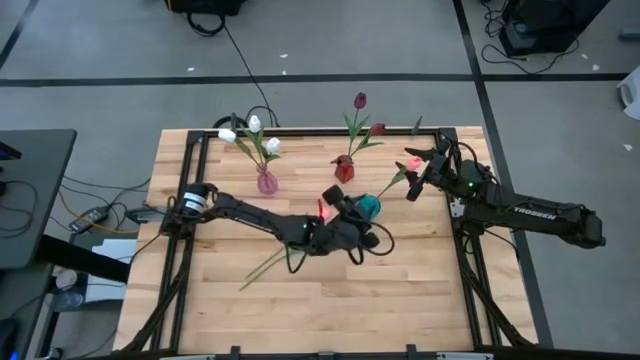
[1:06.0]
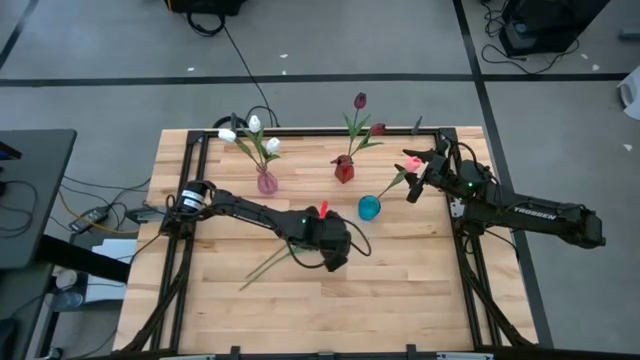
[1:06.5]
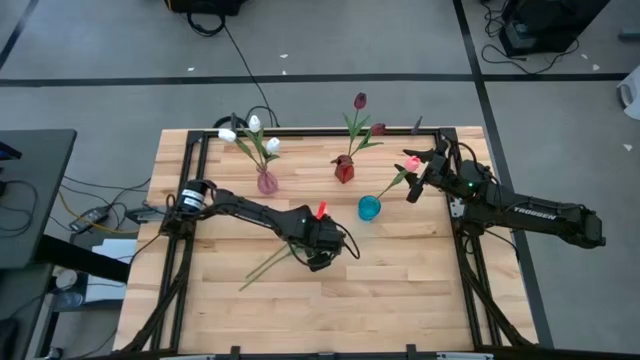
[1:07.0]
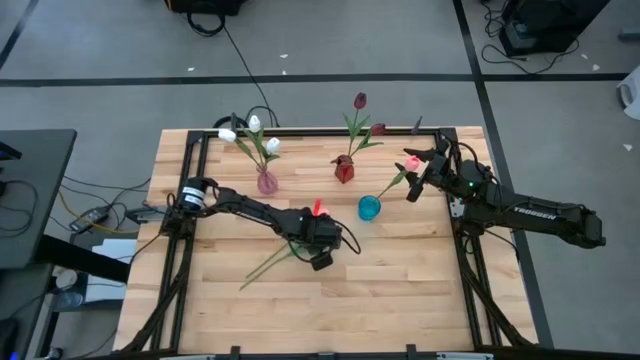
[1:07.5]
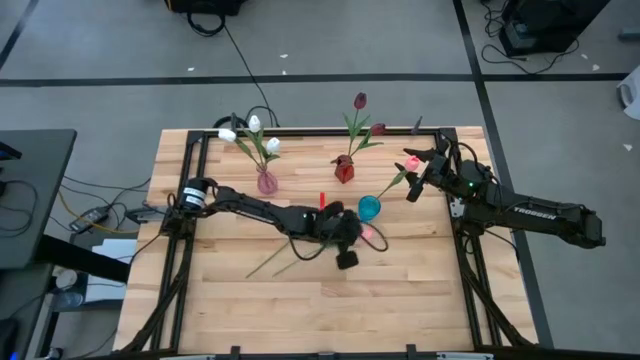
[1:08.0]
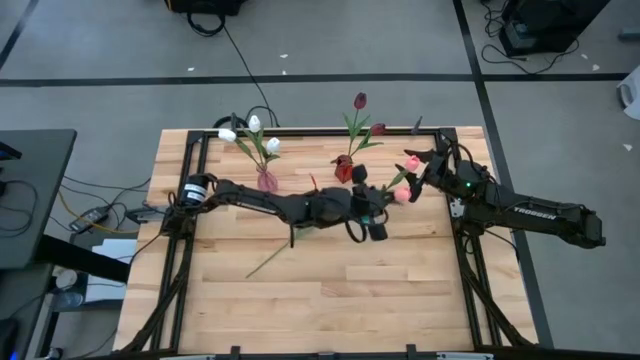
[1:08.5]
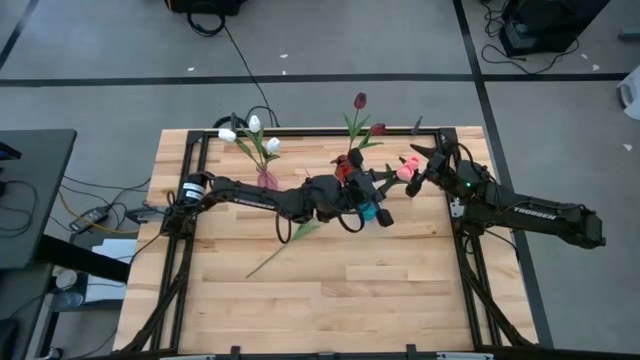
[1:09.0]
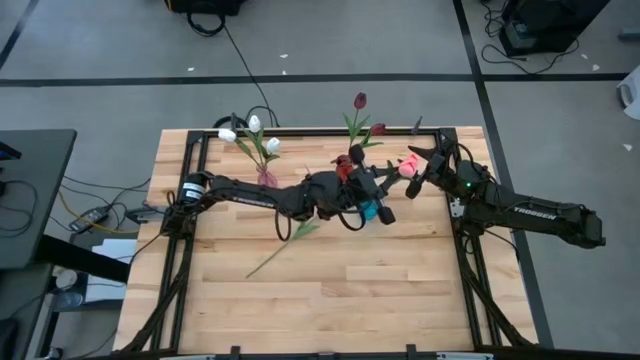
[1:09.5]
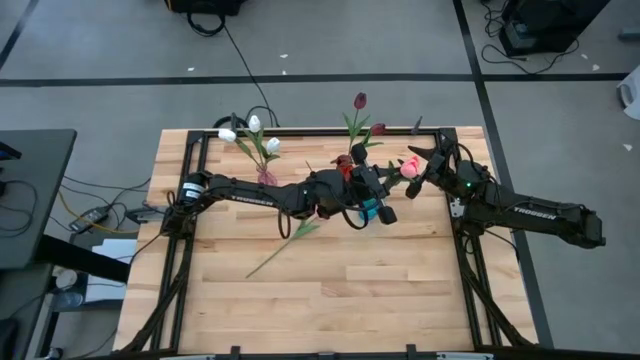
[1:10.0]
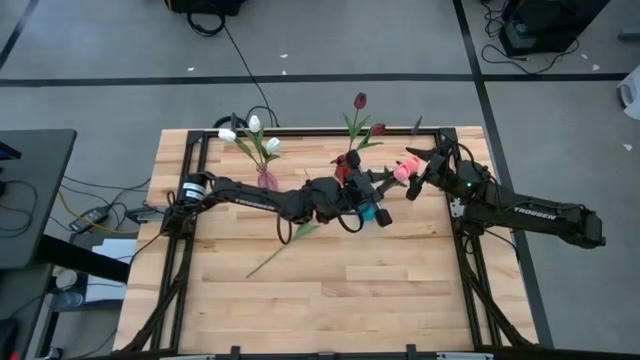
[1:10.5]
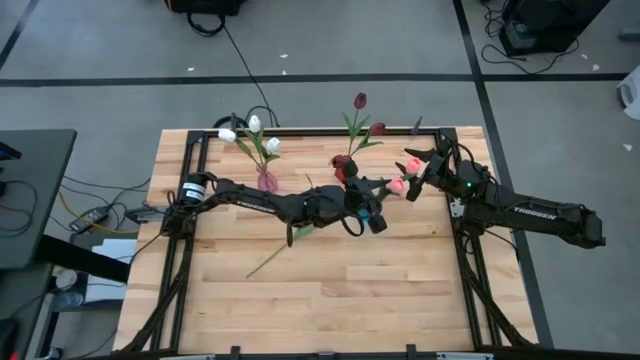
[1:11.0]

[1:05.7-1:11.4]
Task: Sort flowers into vase by color
Put the pink flower into the blue vase

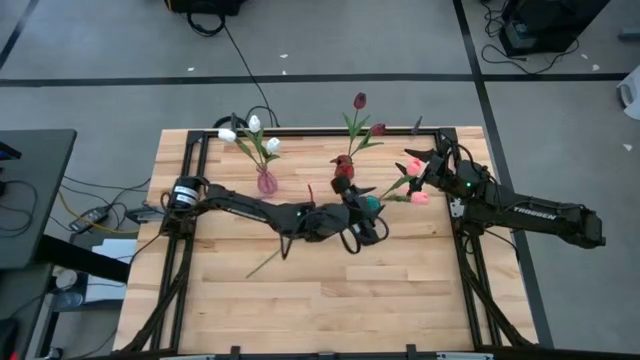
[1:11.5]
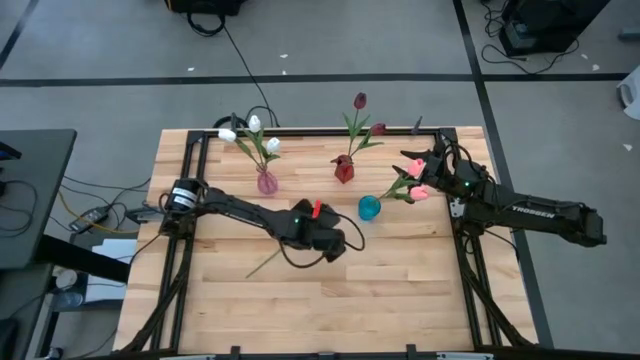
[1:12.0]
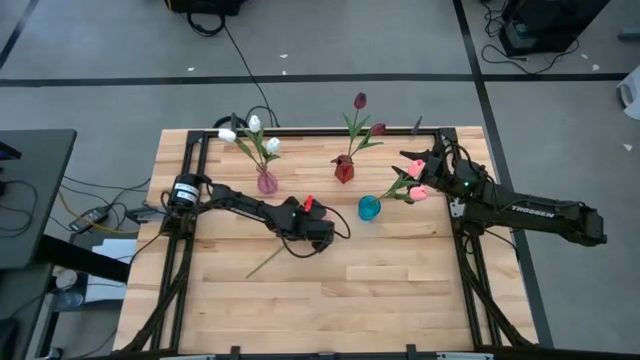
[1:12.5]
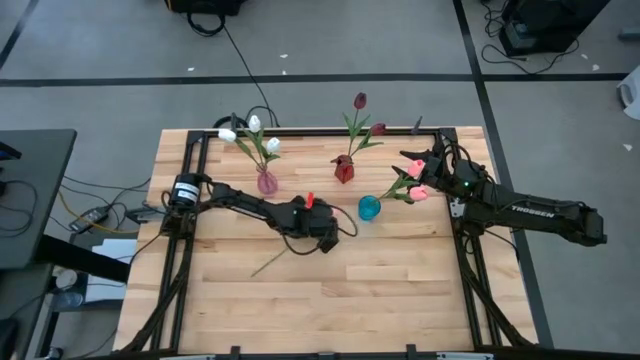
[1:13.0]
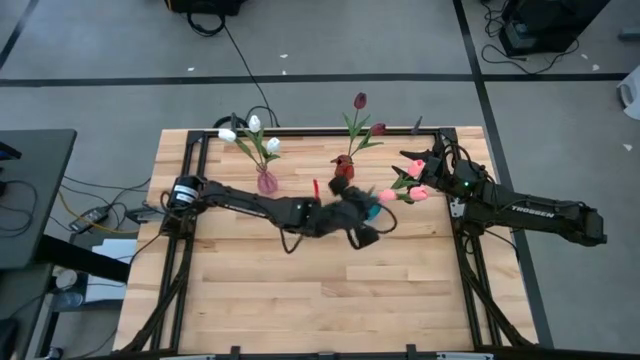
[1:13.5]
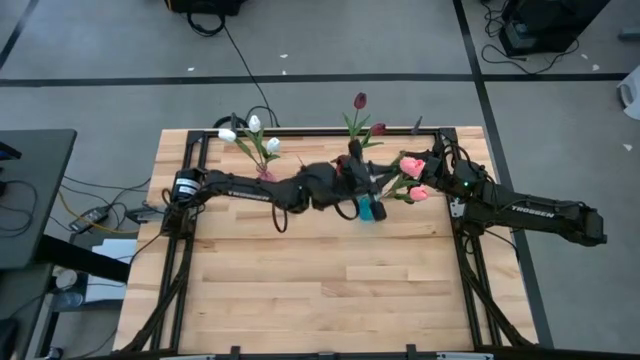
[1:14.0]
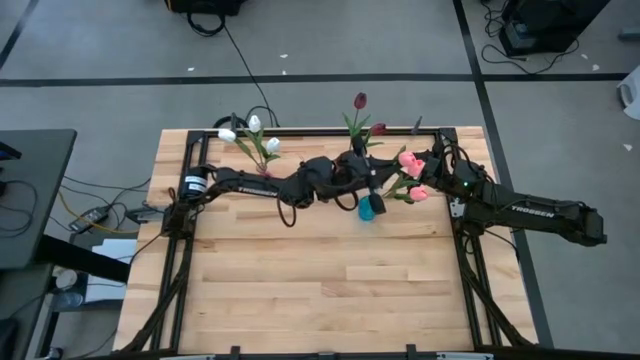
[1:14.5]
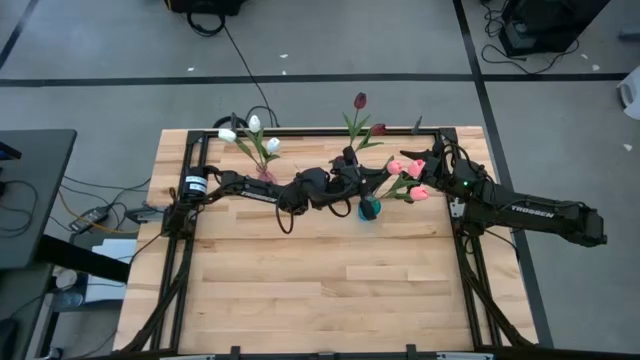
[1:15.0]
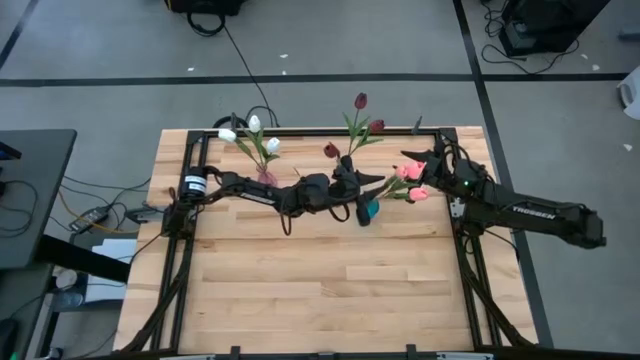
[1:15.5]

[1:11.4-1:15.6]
Put the pink tulip into the blue vase

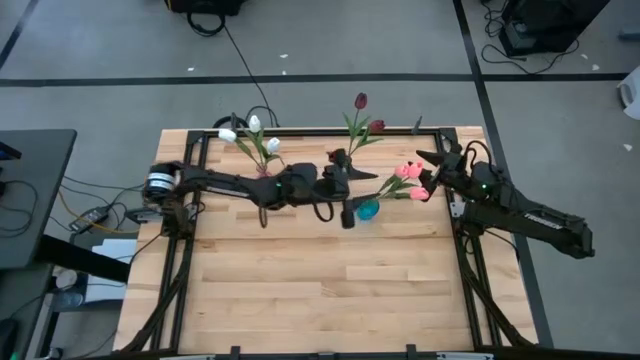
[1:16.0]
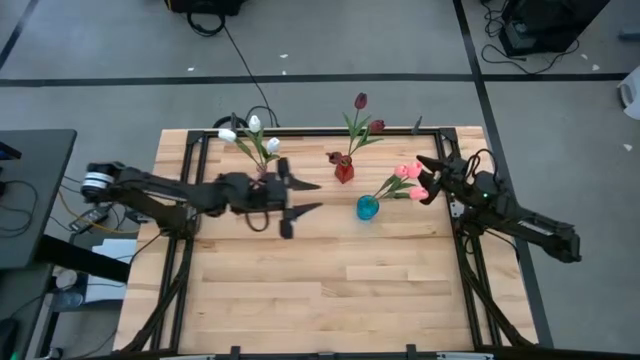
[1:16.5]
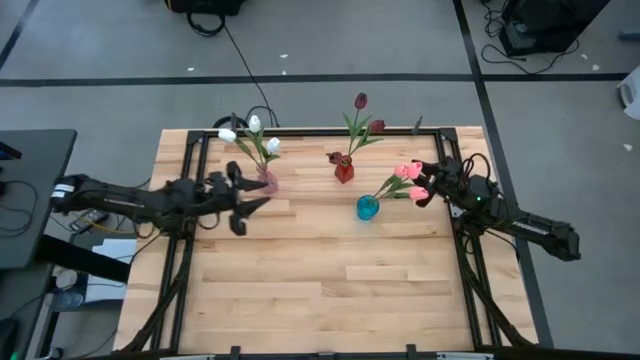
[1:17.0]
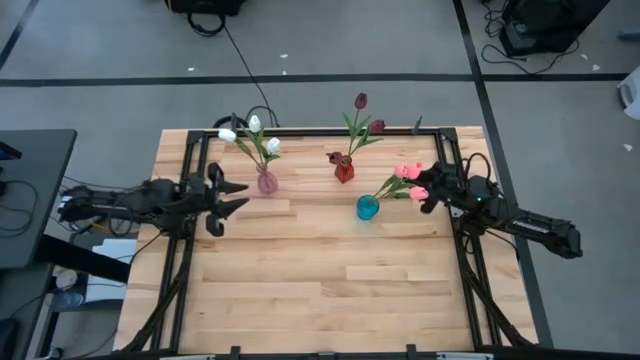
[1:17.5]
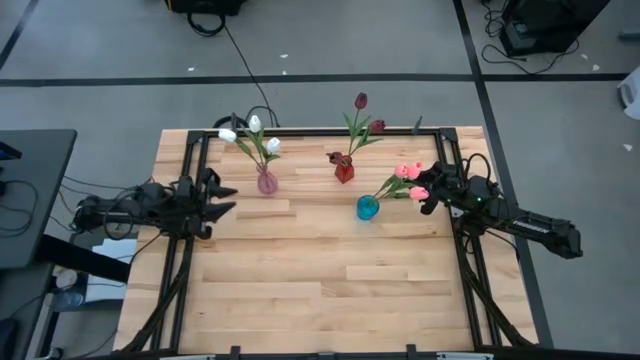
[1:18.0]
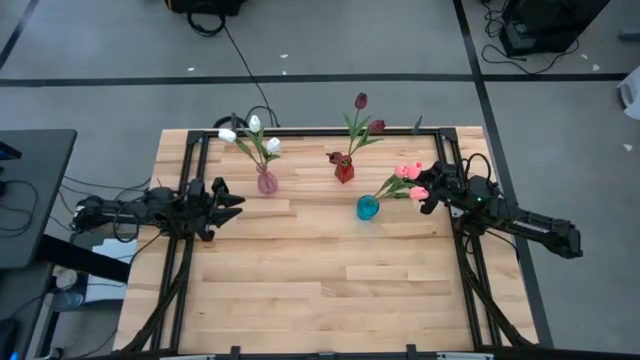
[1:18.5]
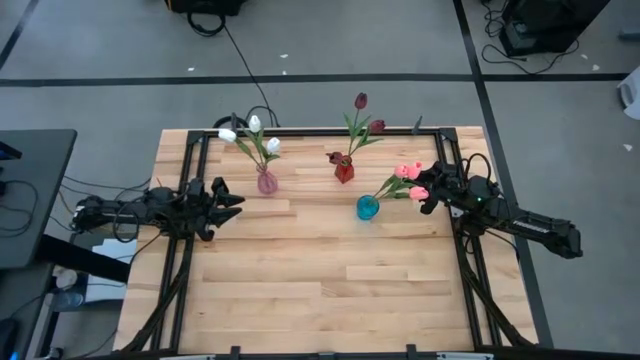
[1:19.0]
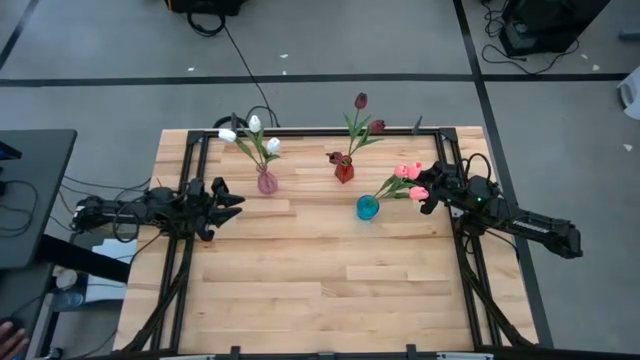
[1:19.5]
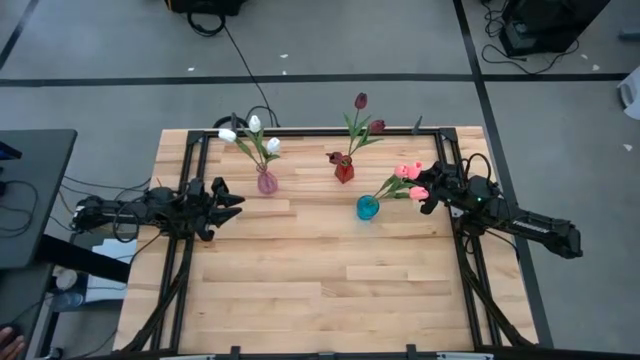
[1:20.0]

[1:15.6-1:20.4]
Return to Home Position

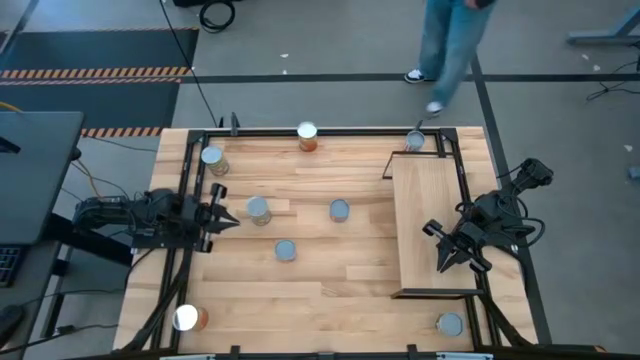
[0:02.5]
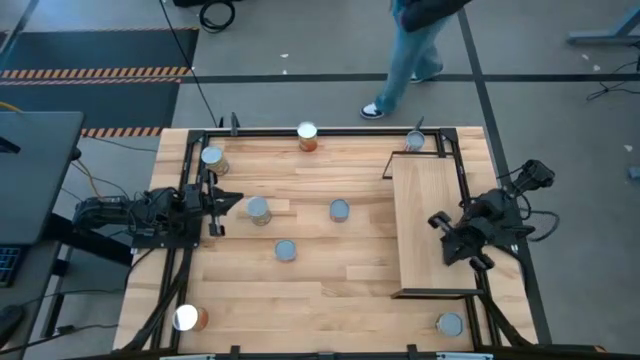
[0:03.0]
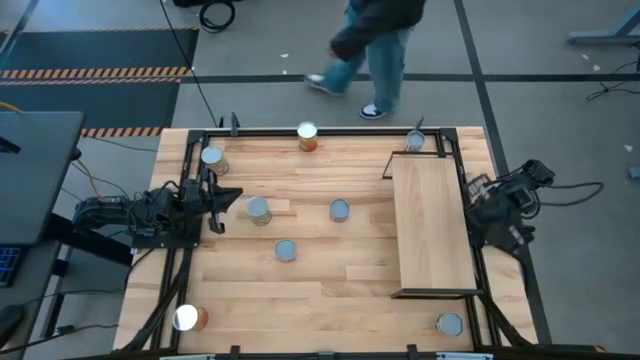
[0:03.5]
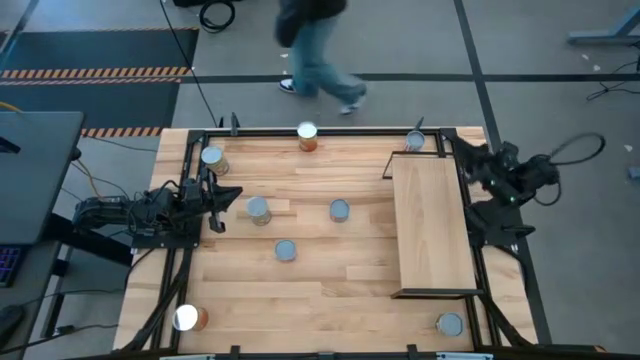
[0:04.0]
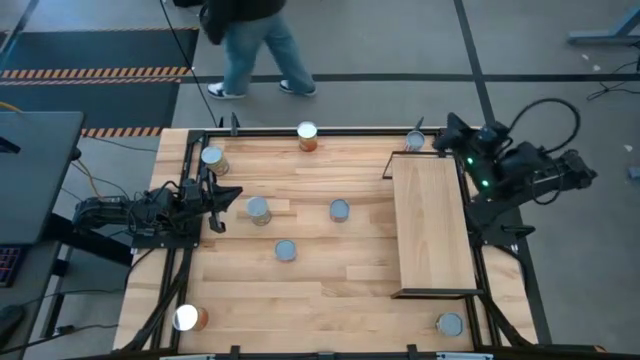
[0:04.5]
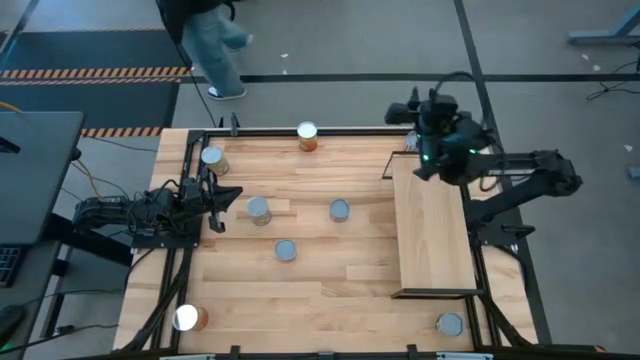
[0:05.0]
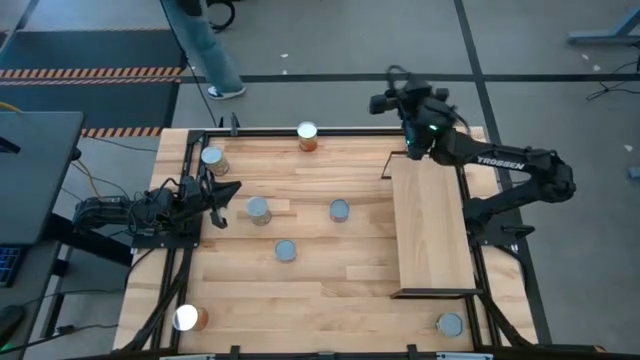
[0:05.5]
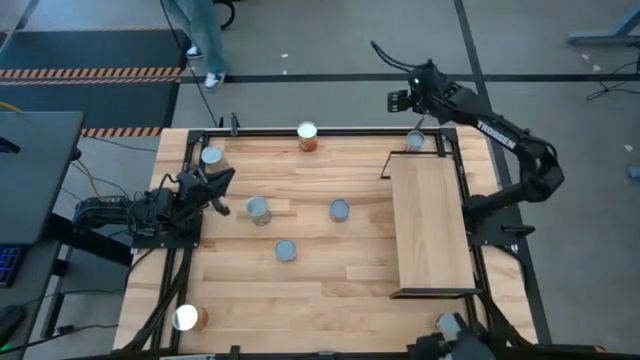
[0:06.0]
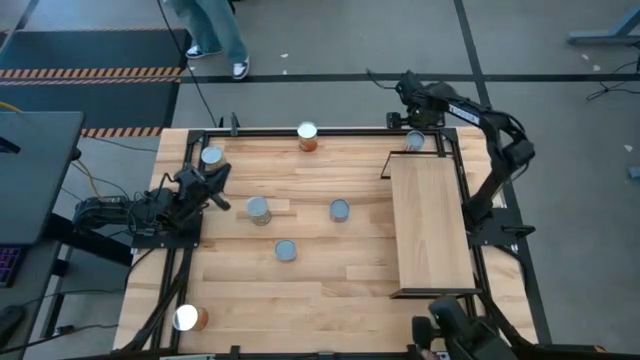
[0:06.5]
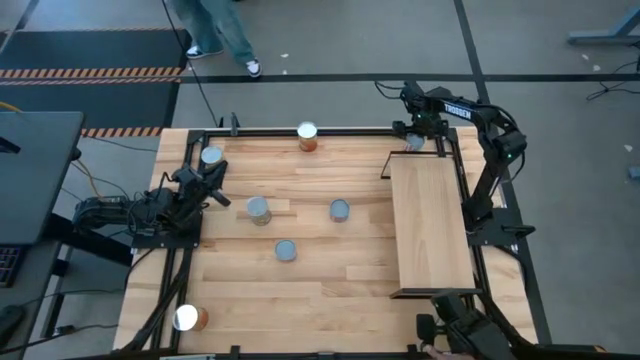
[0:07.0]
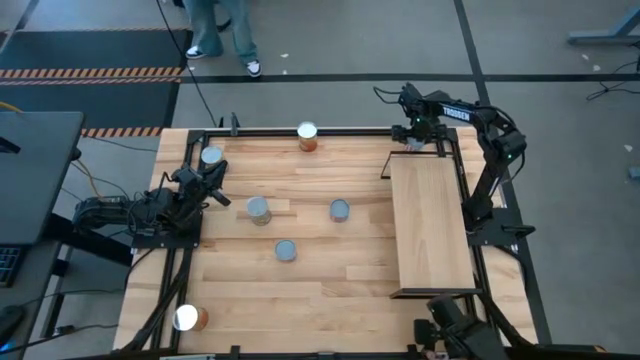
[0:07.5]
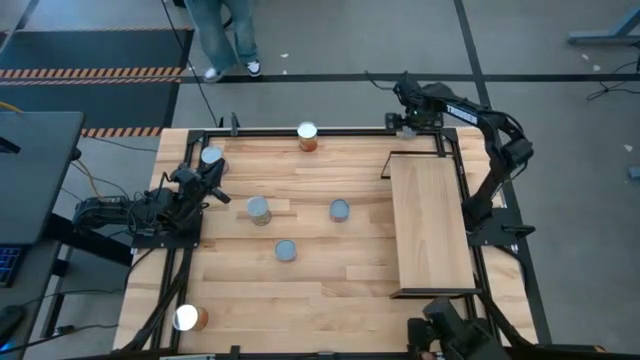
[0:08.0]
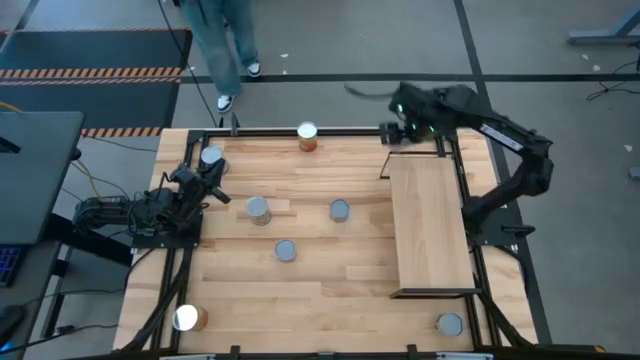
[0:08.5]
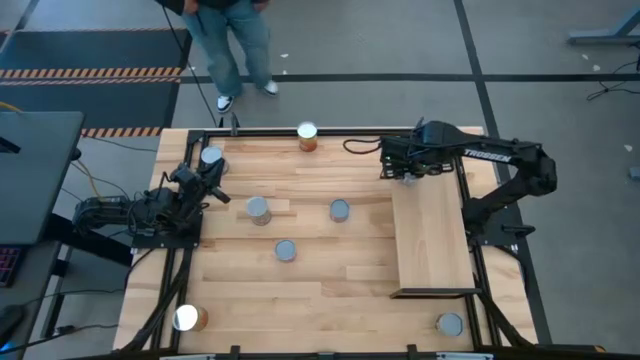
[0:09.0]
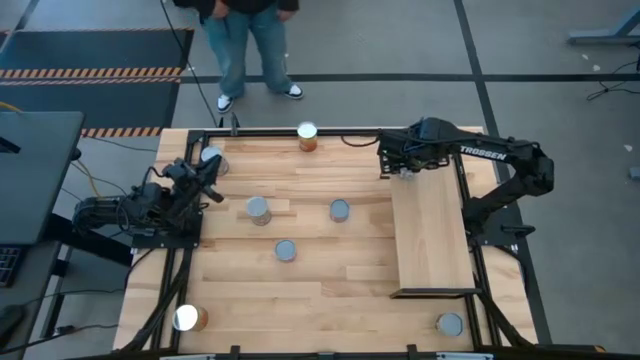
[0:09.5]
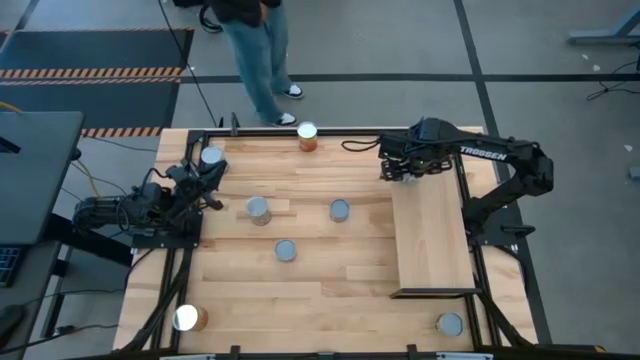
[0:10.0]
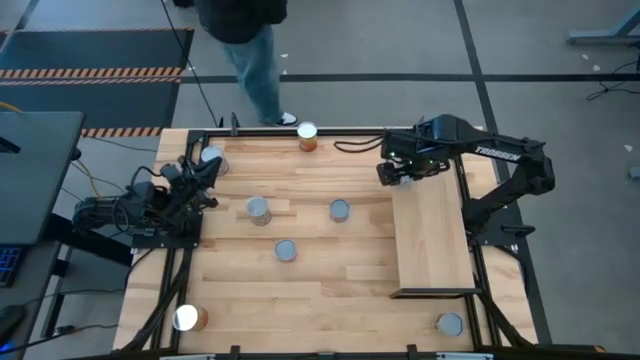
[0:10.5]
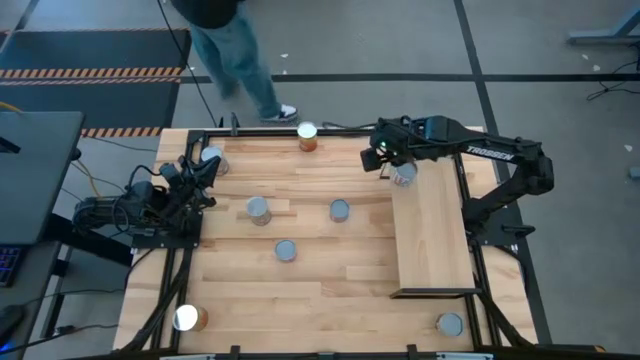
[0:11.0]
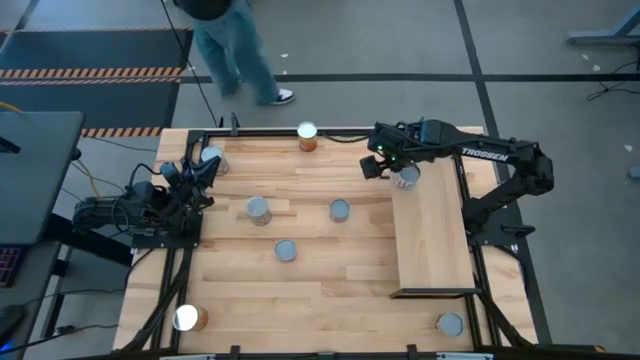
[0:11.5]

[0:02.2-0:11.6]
Task: Pick and place cans onto a shelf
Put the canned carrots on the shelf
